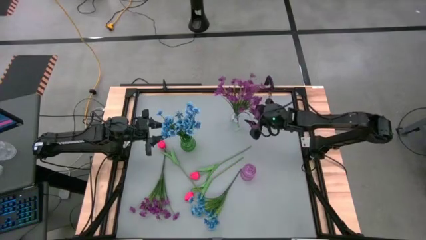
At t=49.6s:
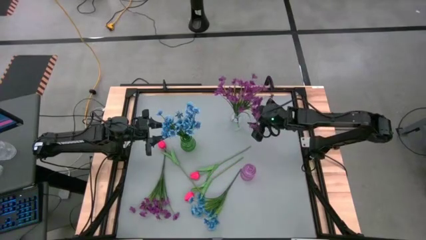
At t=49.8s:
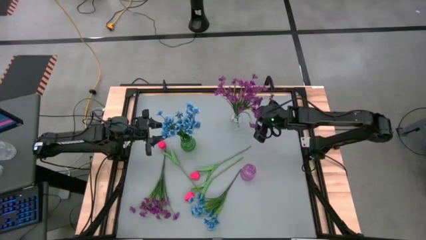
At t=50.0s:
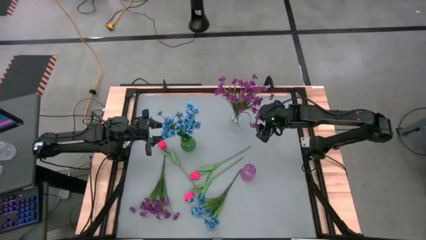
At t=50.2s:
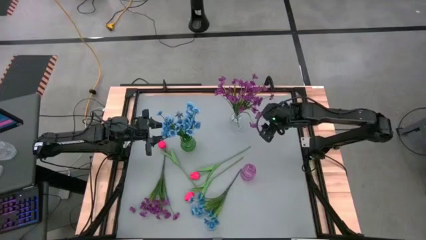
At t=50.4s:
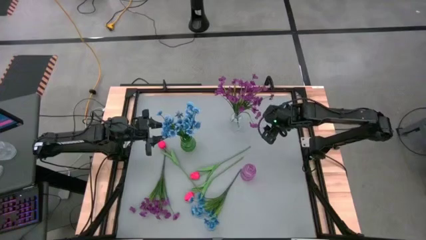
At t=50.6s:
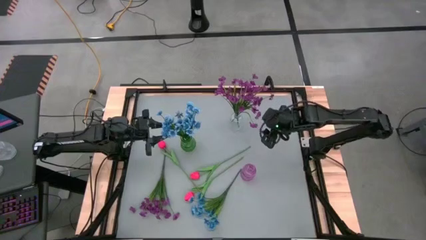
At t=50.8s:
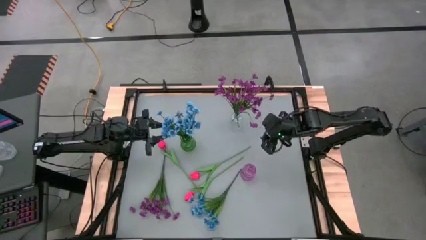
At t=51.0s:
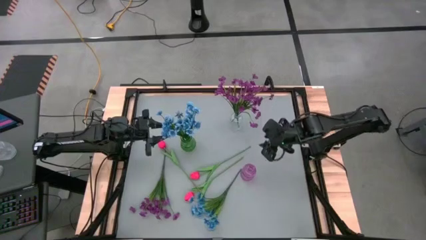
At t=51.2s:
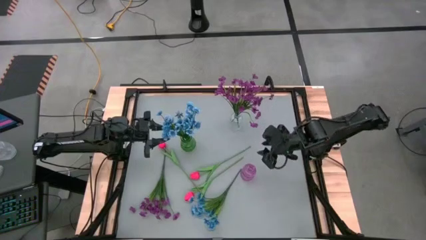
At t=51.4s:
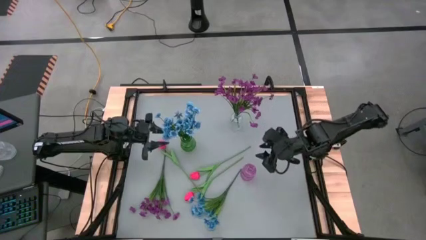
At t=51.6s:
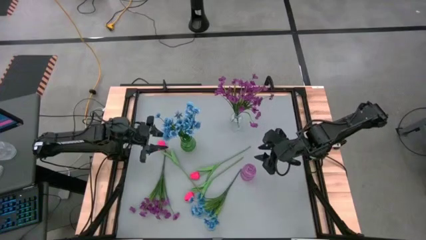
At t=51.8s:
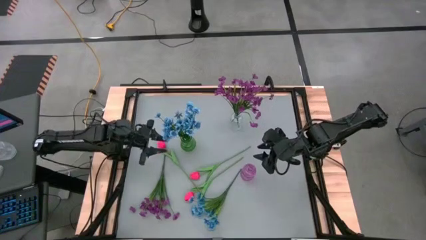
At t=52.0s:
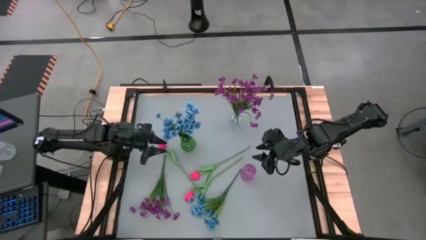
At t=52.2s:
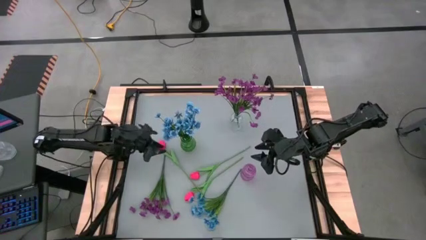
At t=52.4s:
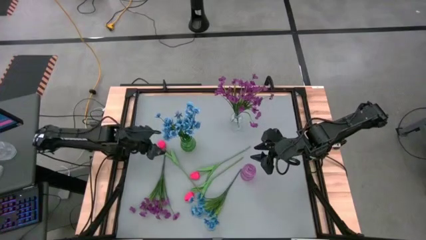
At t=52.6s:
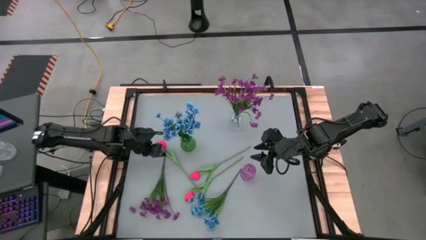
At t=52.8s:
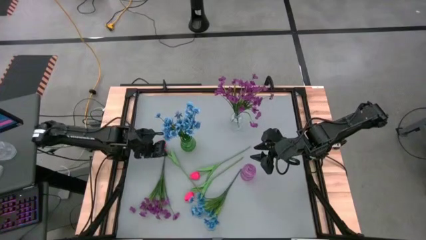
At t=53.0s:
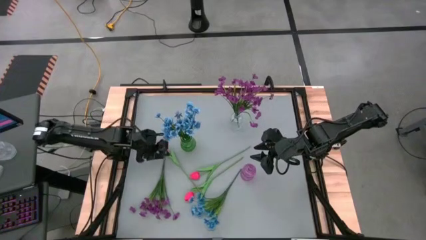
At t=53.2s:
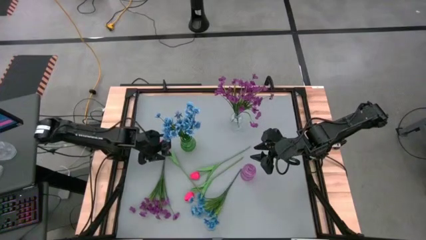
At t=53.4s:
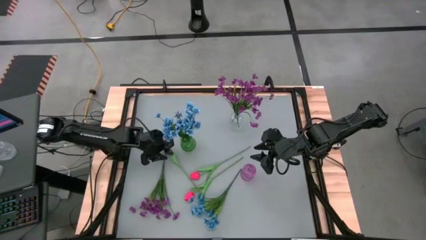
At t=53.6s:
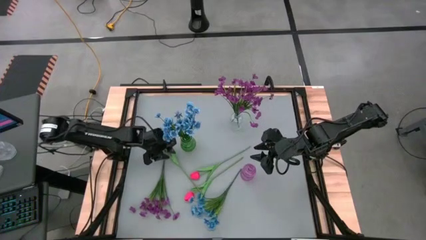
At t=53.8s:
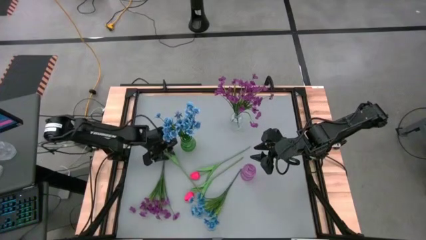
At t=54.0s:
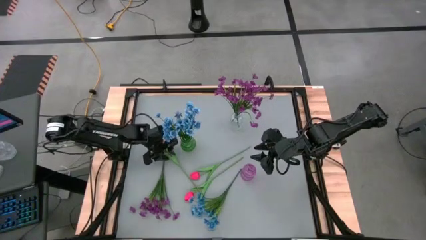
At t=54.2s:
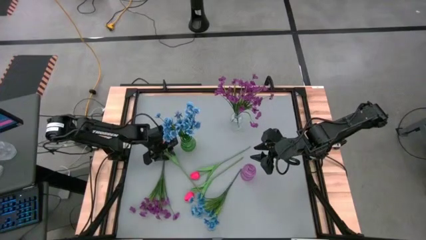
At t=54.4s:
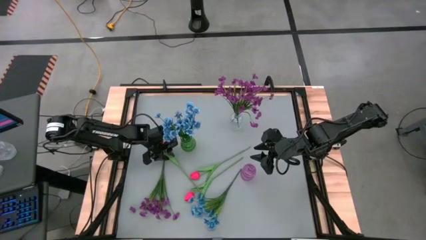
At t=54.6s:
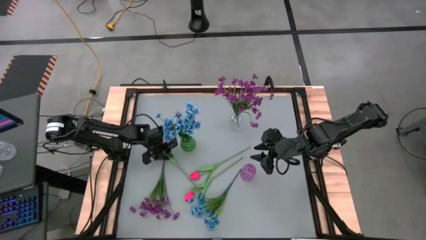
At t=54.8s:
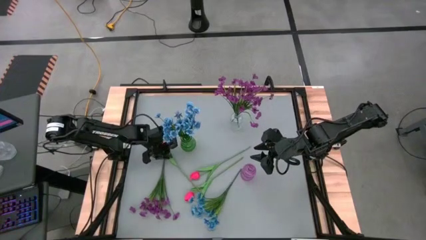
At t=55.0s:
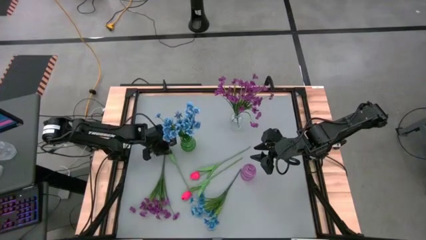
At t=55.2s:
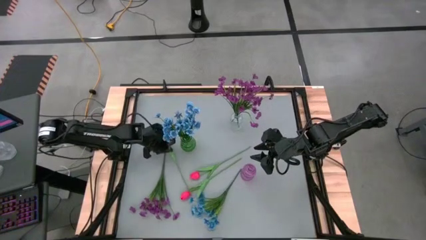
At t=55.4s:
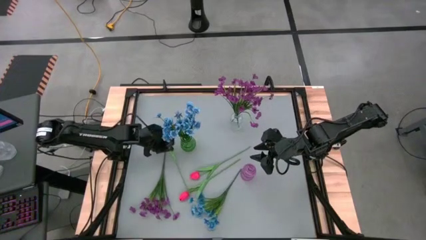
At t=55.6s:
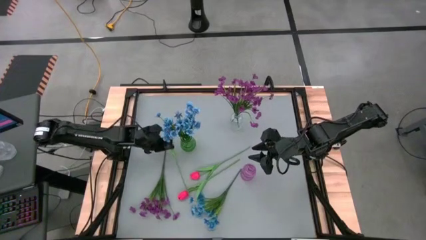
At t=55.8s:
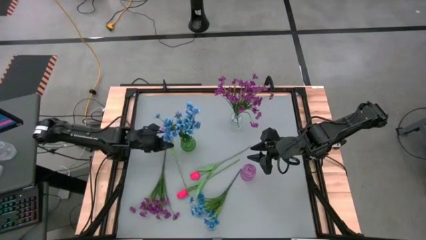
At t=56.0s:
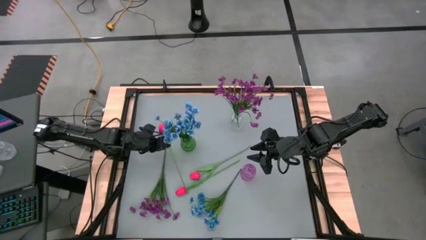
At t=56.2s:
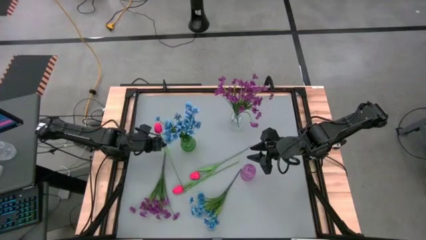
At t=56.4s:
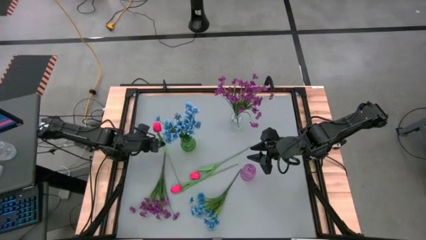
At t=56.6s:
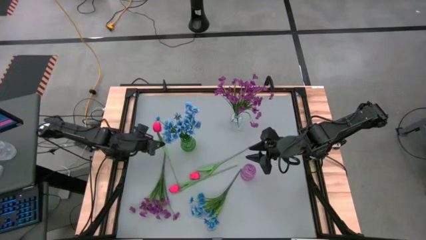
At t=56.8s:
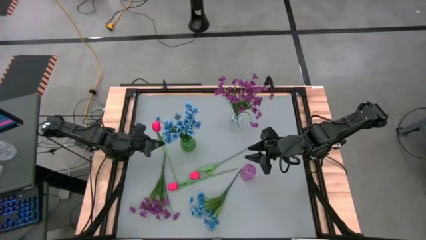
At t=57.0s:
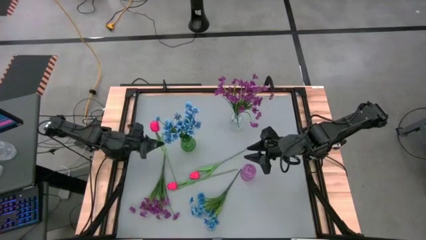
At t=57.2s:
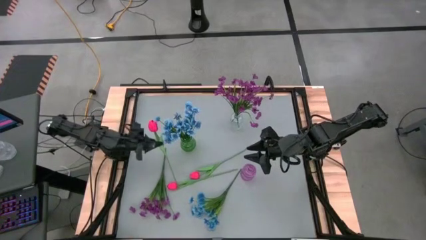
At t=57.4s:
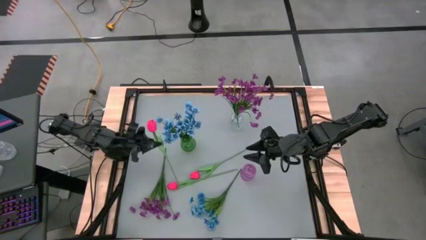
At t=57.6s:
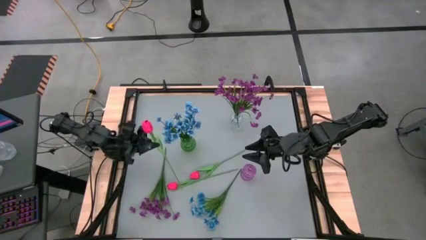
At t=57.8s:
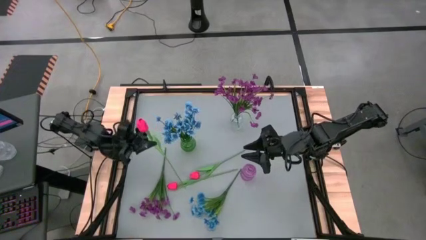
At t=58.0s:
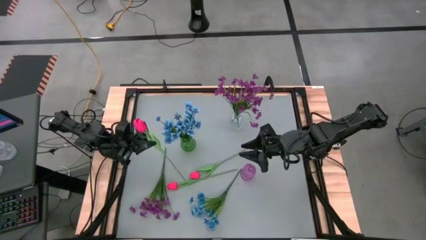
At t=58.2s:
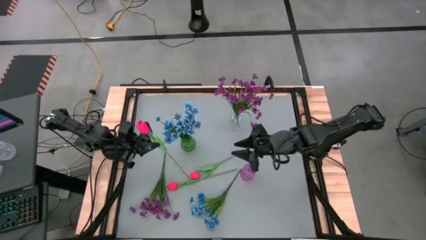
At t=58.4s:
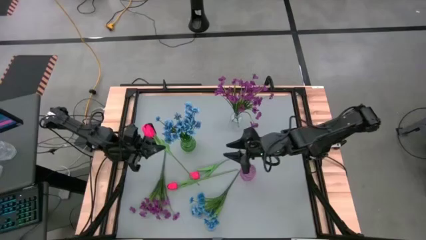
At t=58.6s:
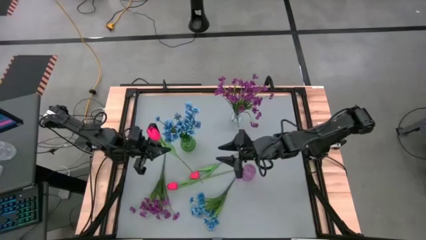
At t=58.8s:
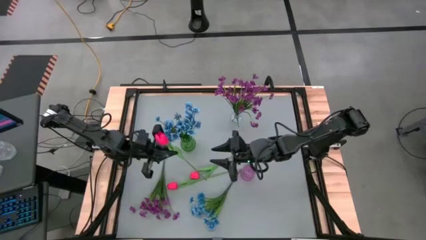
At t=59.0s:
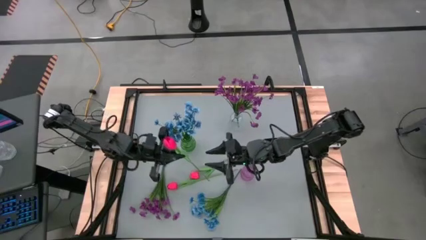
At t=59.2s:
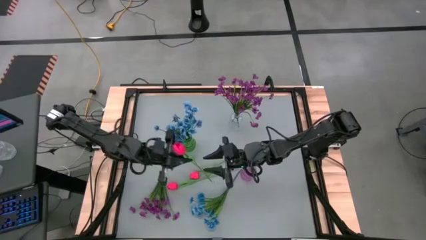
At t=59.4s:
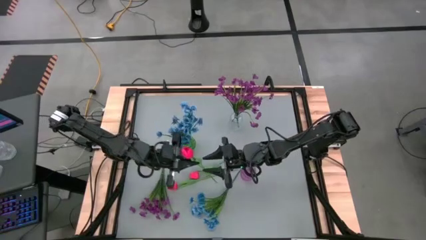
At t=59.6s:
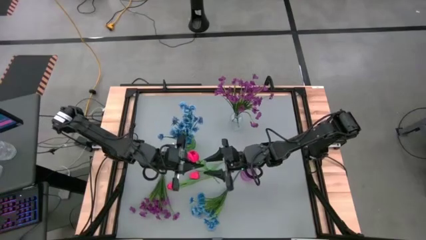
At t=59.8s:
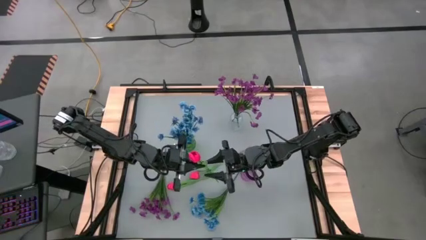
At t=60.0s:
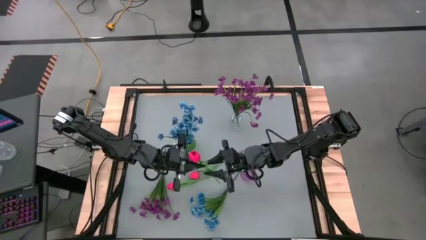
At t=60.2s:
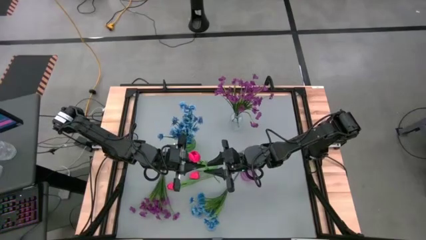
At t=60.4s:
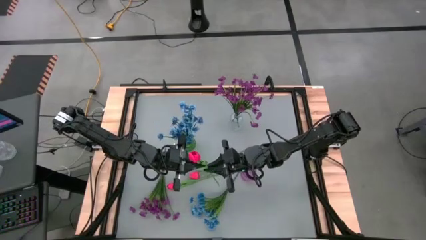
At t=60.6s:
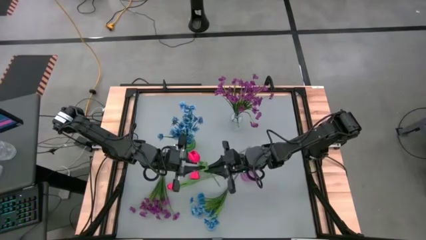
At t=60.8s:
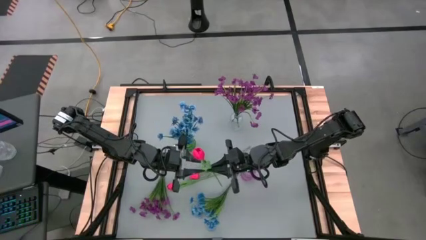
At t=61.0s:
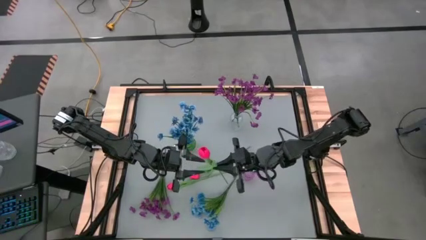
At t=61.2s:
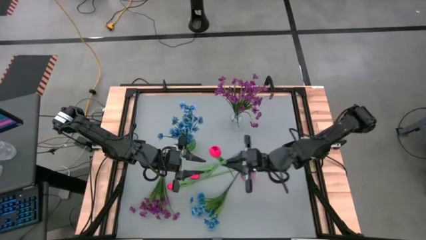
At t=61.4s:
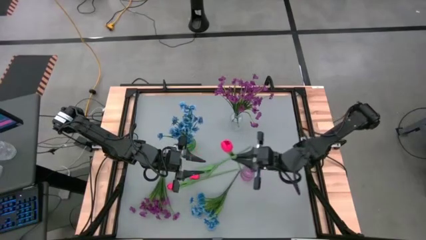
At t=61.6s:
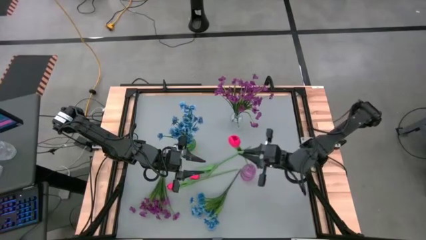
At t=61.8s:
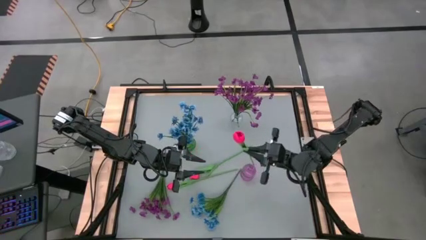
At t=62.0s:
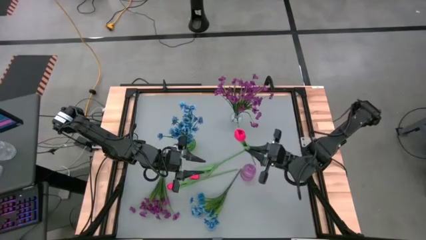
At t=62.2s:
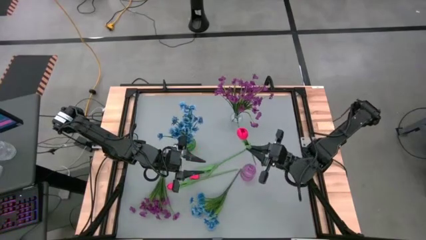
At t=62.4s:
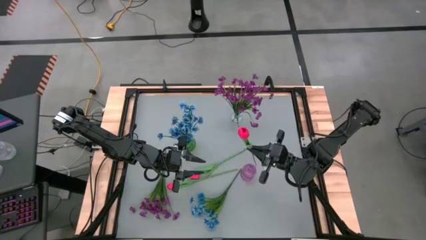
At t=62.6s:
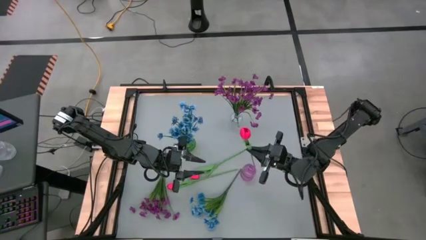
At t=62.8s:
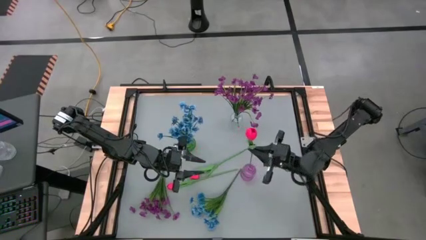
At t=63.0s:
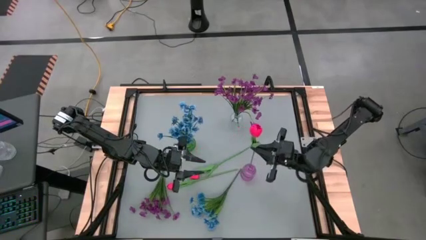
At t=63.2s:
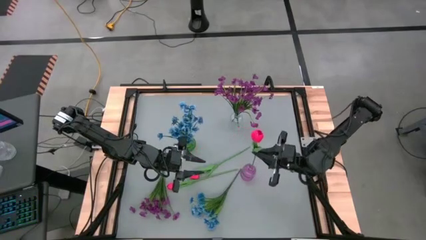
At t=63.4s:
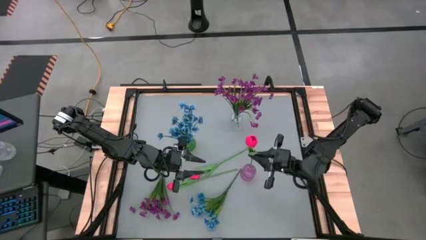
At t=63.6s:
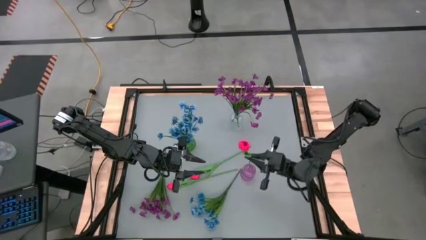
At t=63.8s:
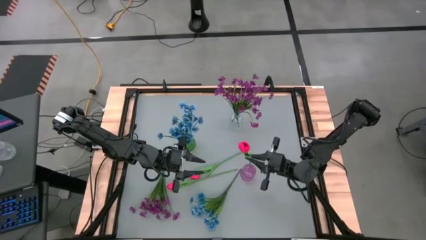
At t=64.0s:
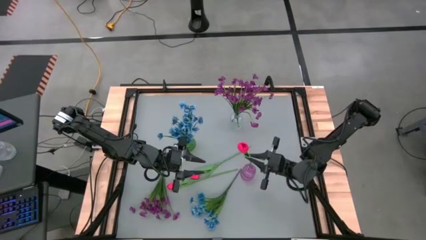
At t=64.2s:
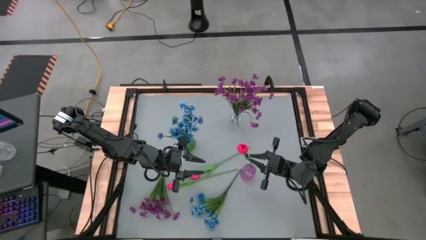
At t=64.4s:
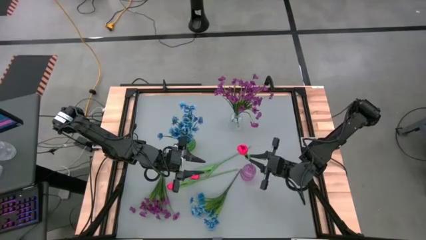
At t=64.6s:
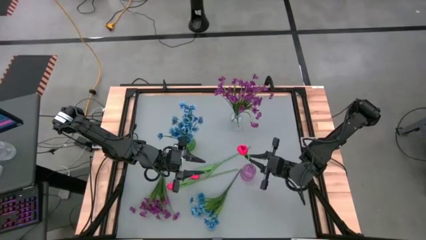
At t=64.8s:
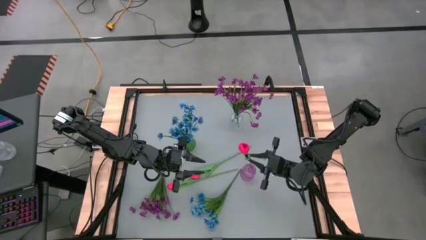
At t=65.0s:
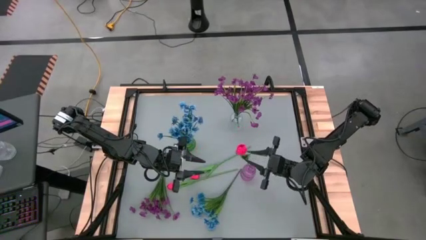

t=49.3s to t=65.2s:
Task: Sort flowers into vase by color
Put the top left pink tulip into the purple flower vase
